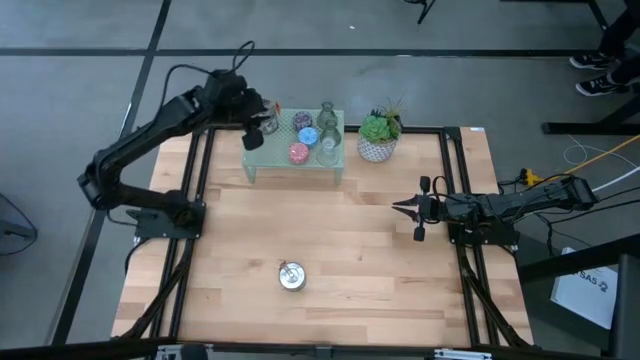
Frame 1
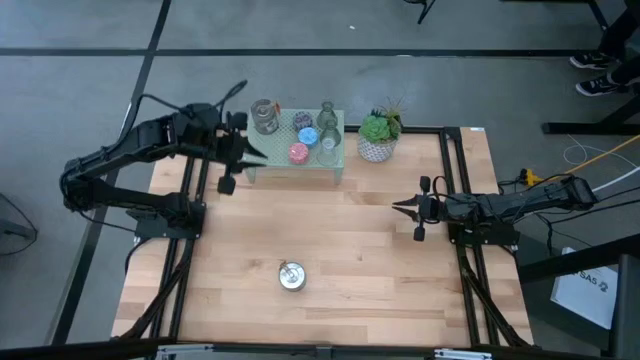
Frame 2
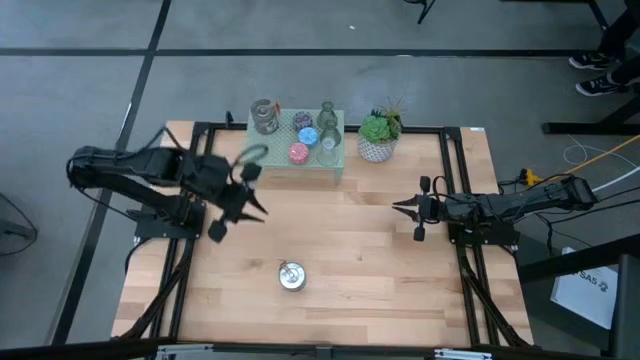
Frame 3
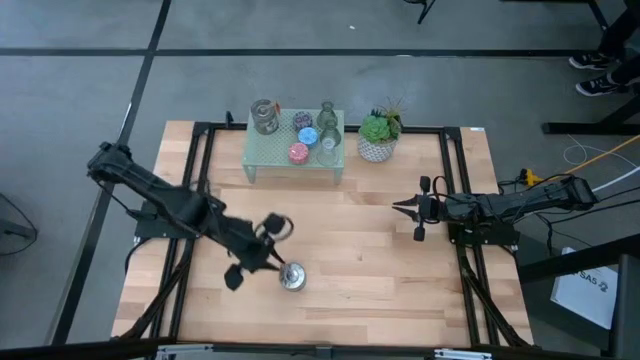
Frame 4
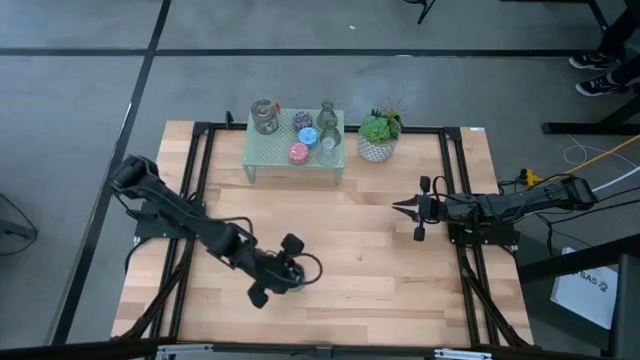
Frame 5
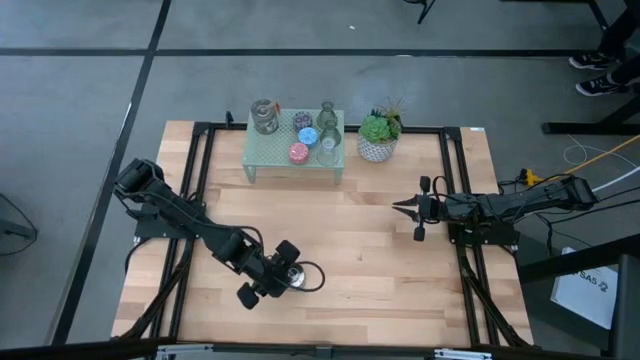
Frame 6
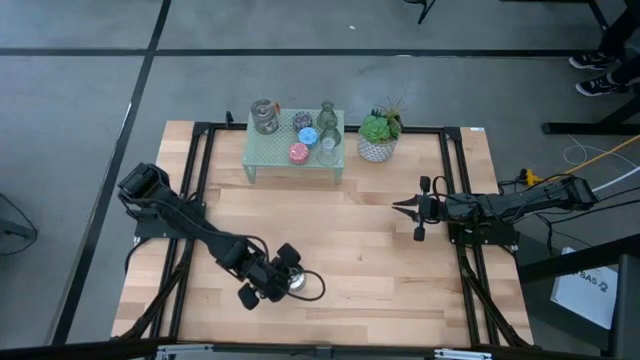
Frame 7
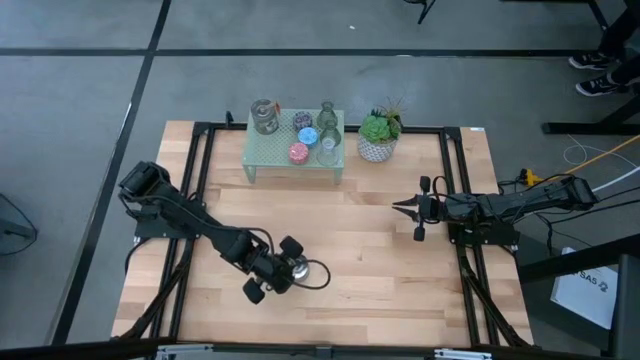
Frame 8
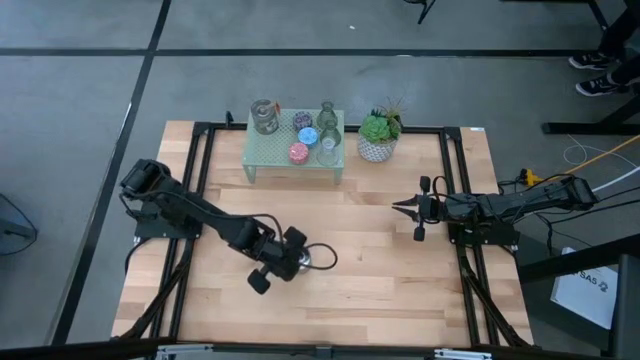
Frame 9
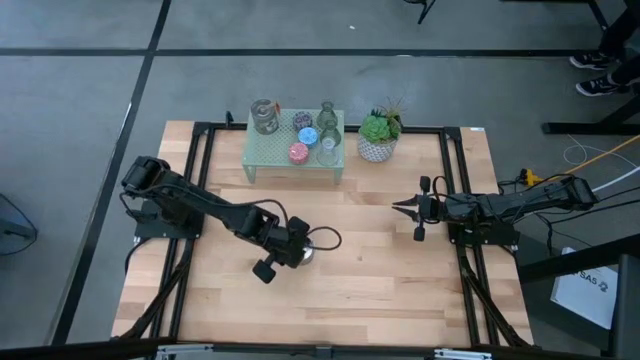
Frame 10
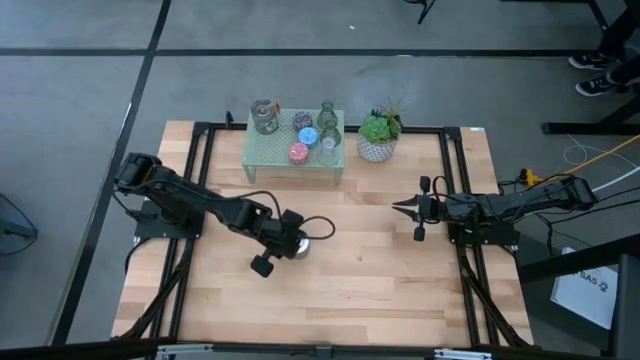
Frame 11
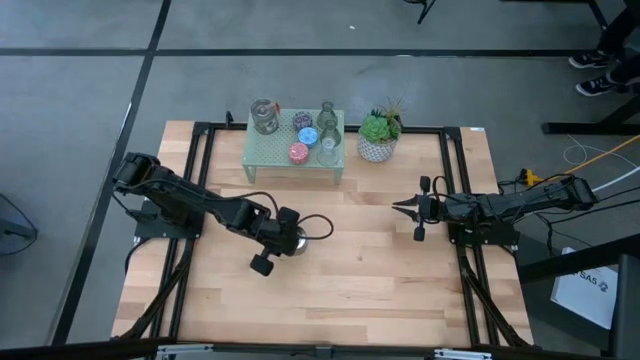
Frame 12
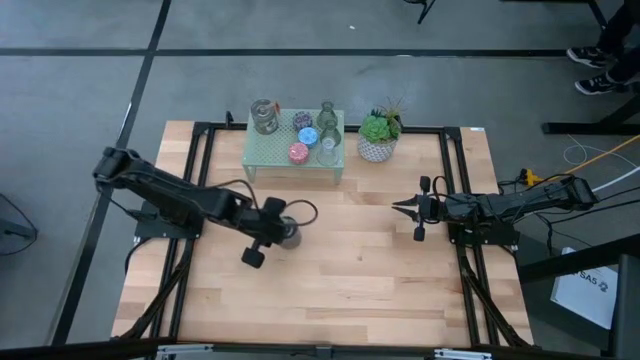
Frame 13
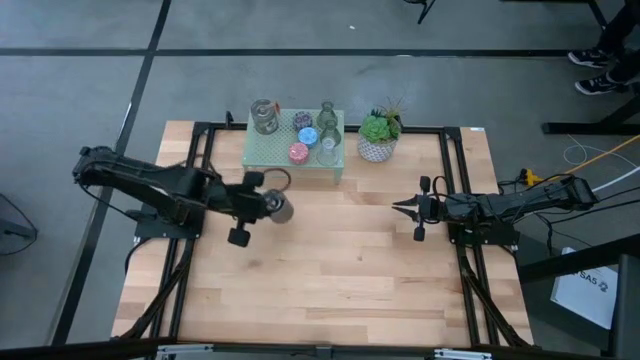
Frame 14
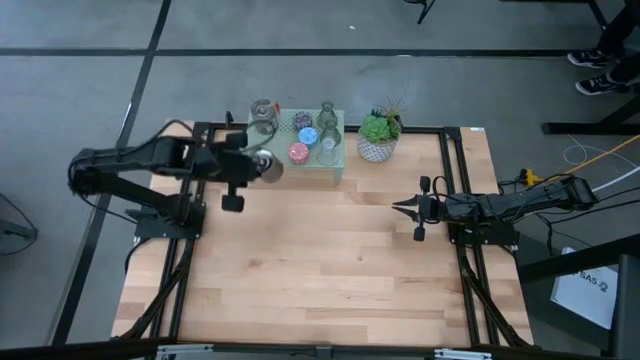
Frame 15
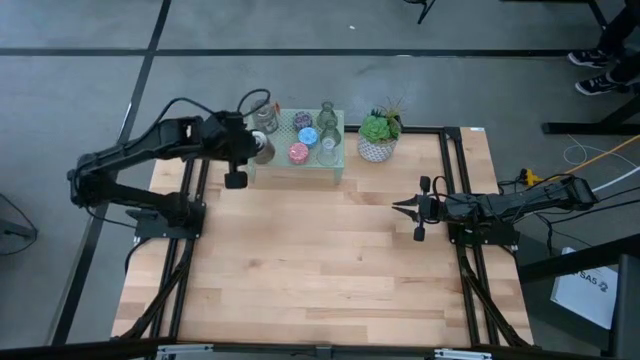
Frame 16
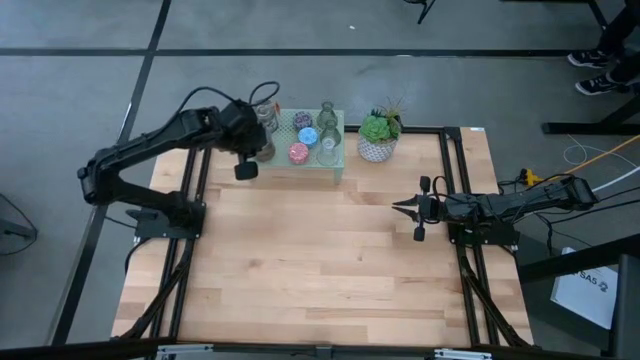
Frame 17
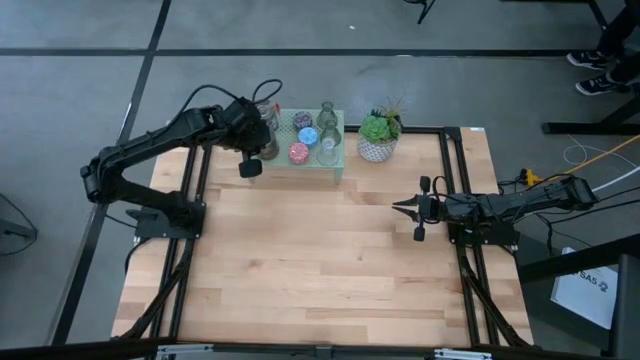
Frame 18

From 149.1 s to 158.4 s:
Task: Pick & Place candle stick holders
Put the orange and silver candle can on the shelf

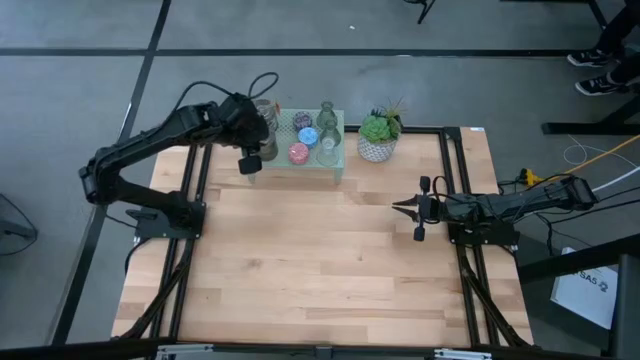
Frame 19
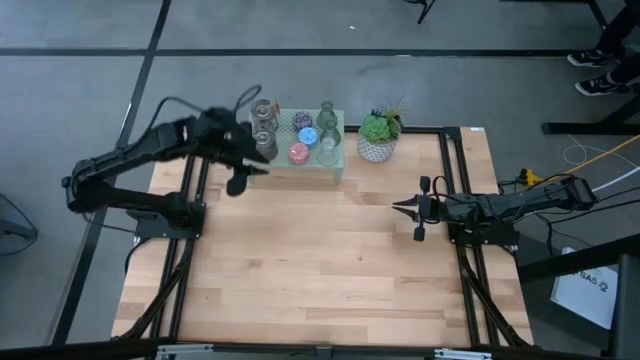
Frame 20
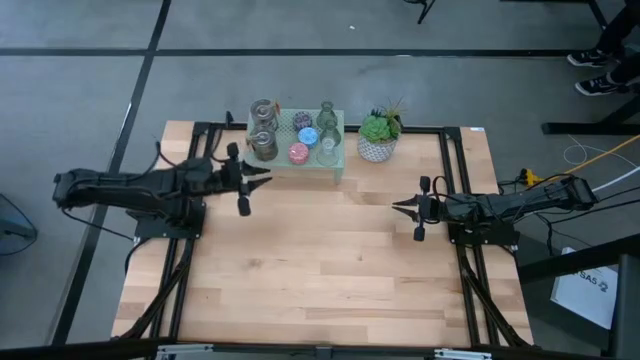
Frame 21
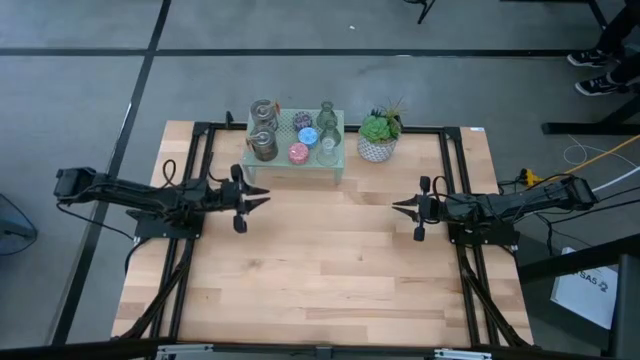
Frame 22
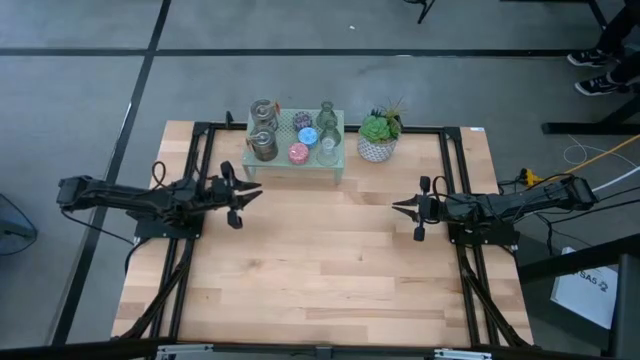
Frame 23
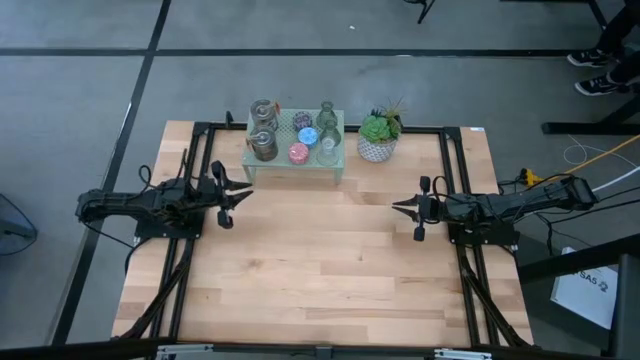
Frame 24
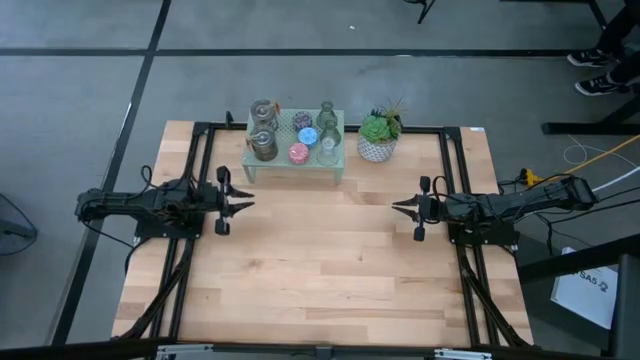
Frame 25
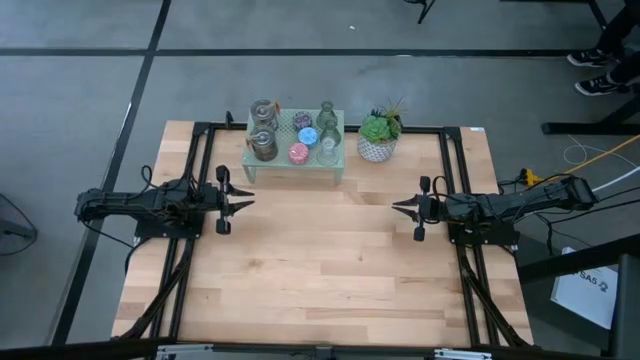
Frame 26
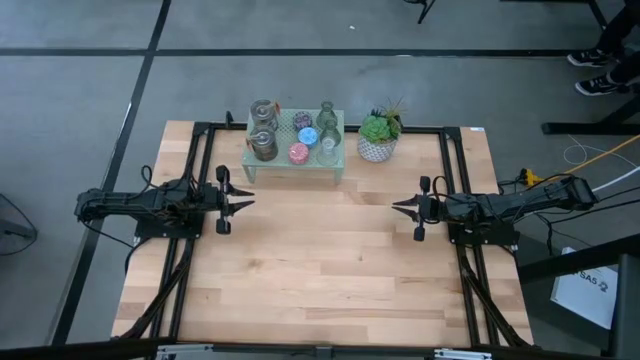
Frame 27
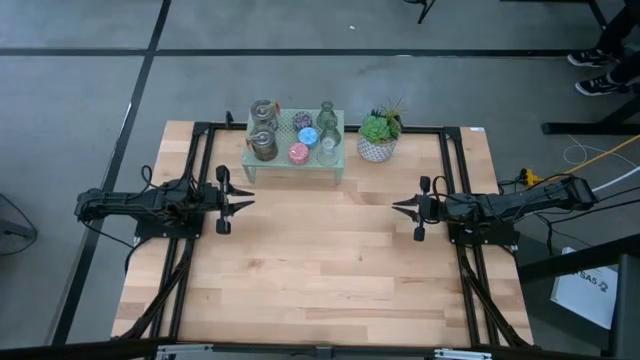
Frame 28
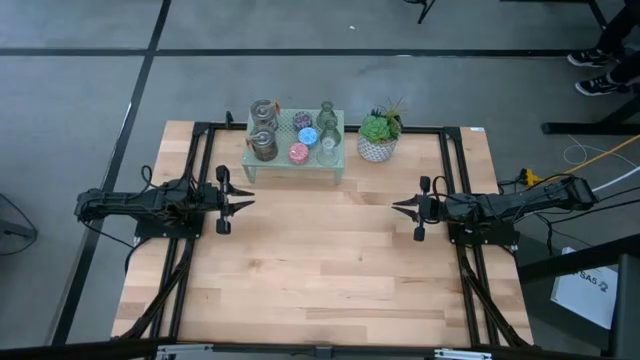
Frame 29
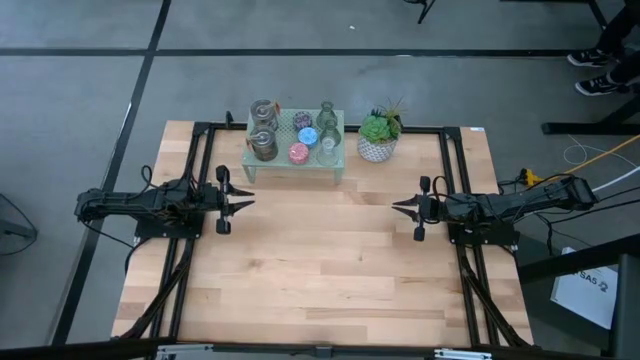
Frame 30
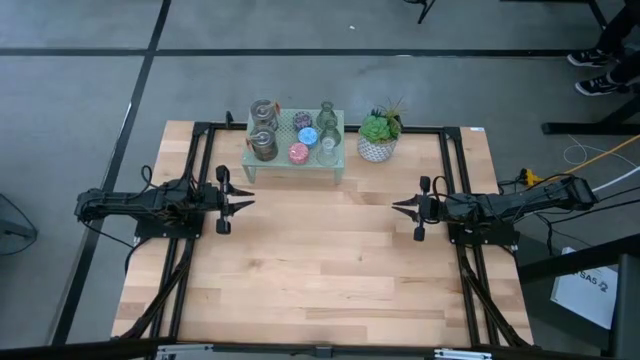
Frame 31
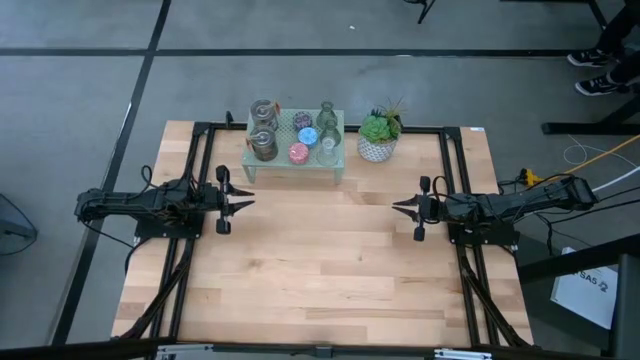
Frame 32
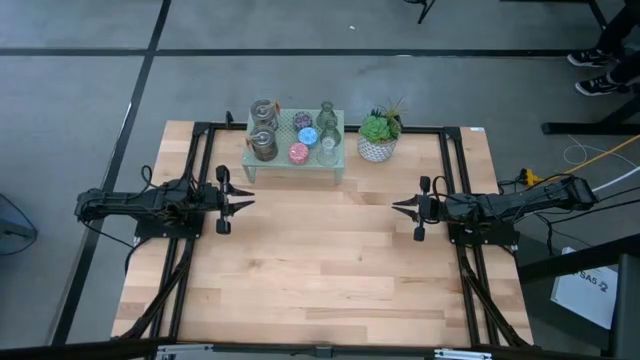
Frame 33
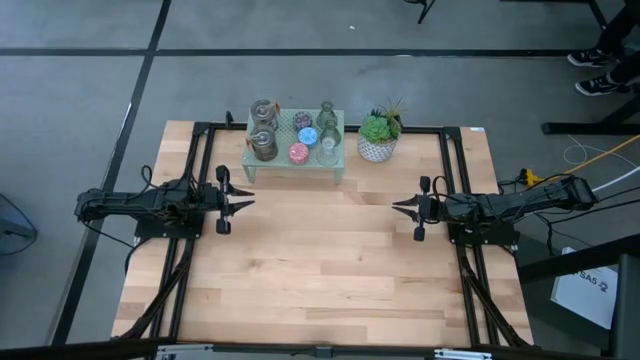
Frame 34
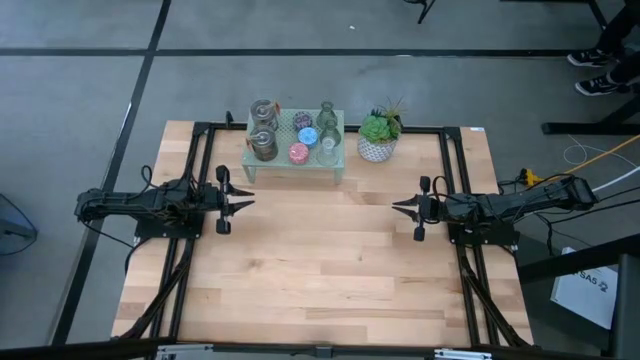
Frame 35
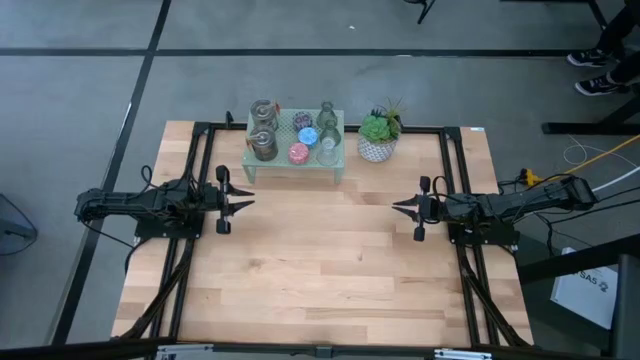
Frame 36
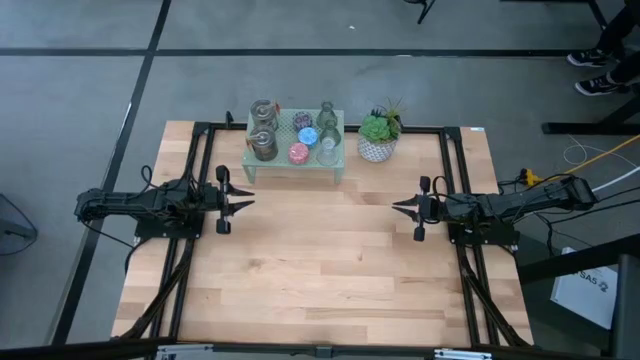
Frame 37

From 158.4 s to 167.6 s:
Return to Home Position

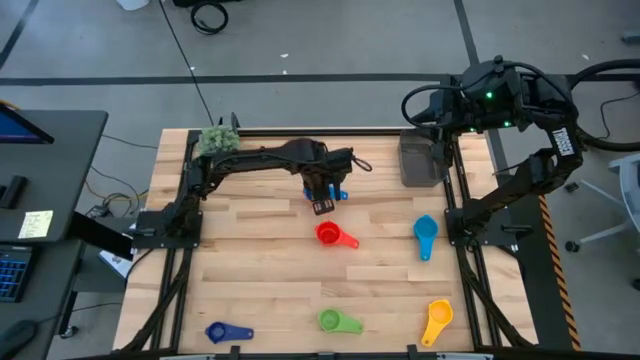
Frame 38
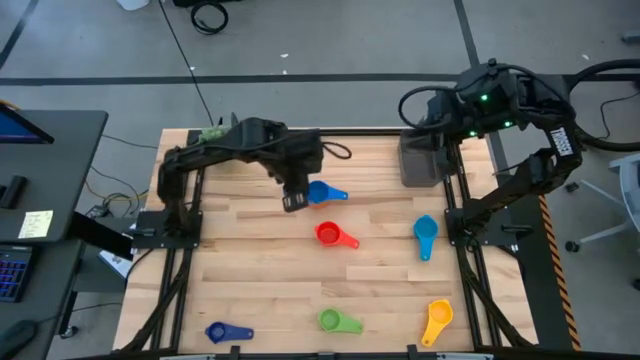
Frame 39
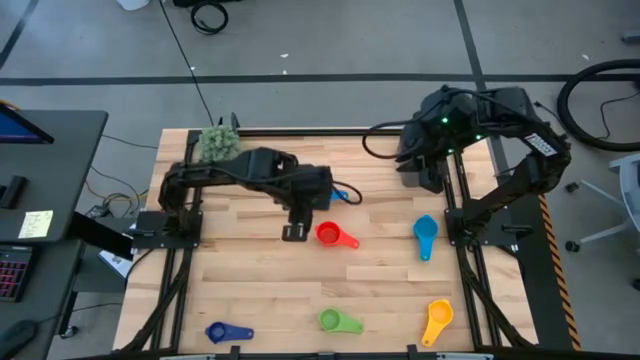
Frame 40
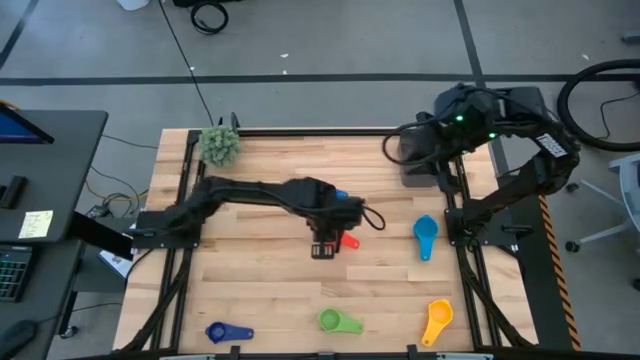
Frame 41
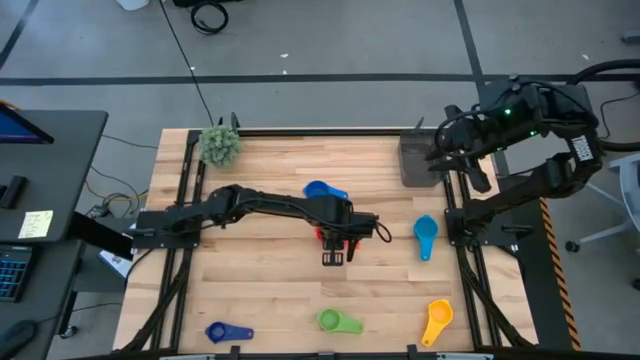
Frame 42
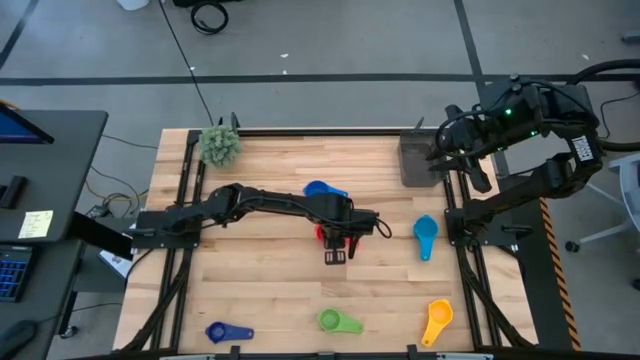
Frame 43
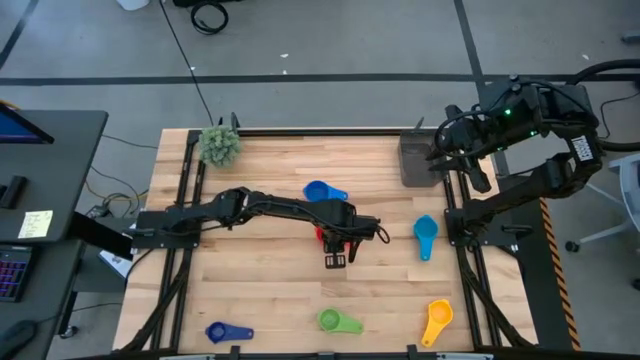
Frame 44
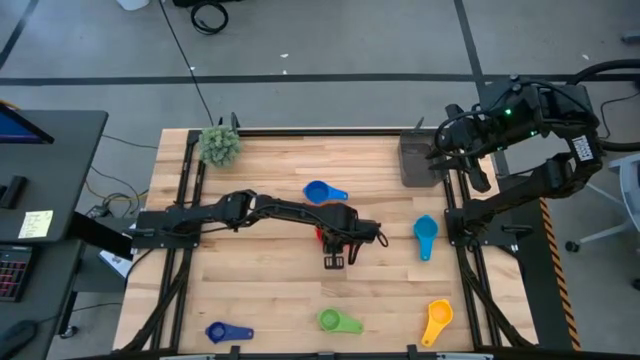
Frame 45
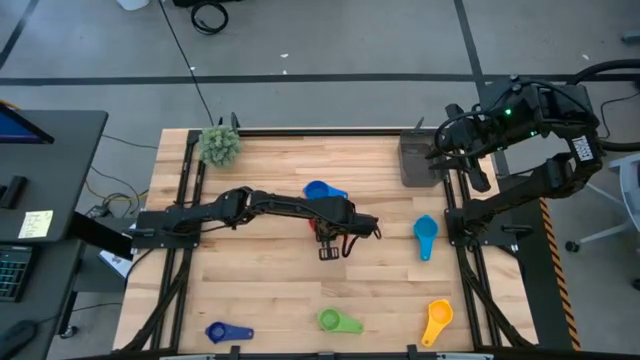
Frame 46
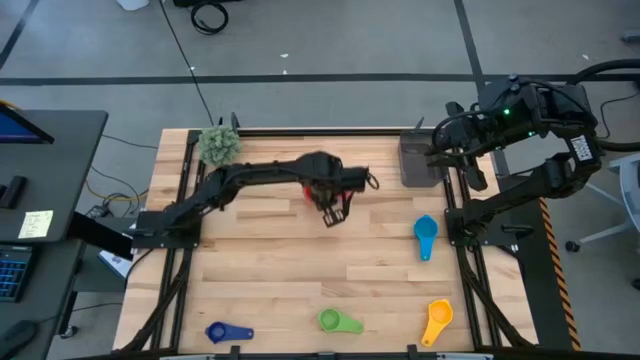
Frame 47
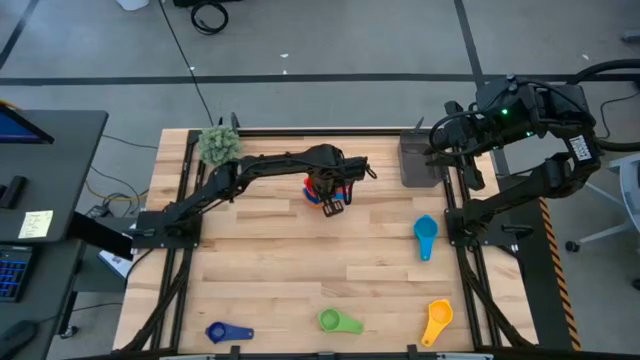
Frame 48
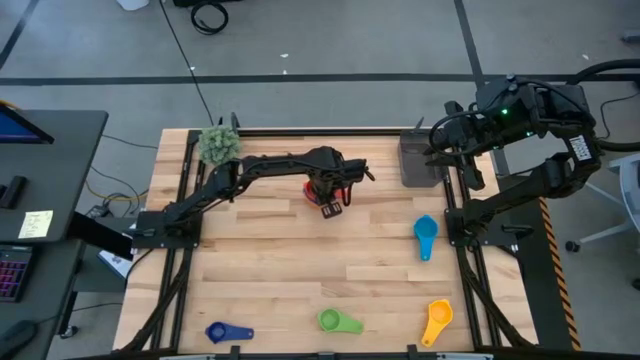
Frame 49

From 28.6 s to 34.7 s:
Task: Nest measuring cups in basket
Stack the red measuring cup on top of the blue measuring cup
